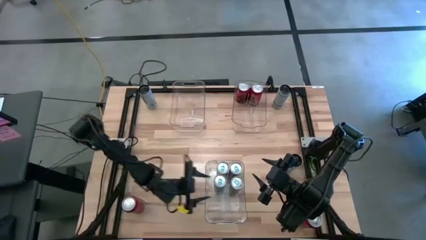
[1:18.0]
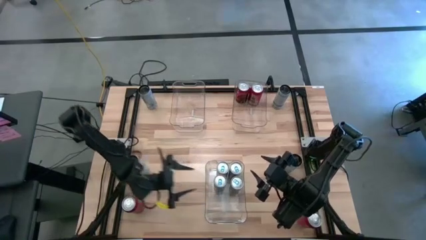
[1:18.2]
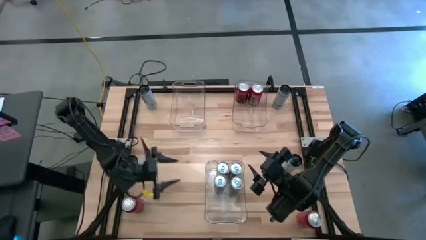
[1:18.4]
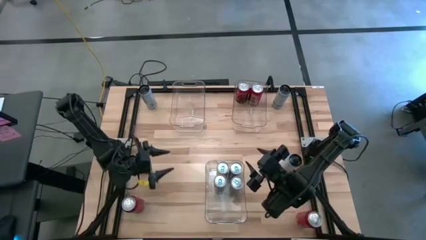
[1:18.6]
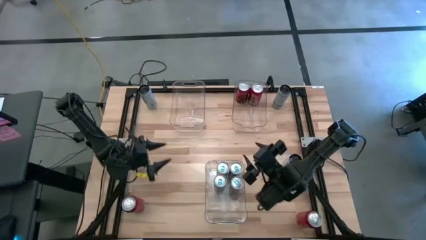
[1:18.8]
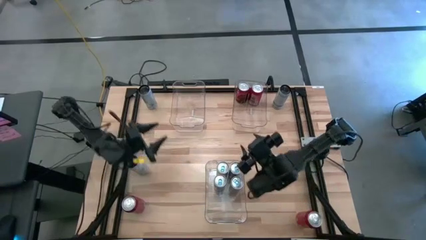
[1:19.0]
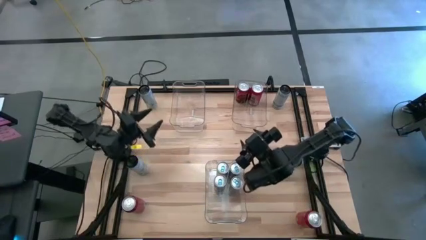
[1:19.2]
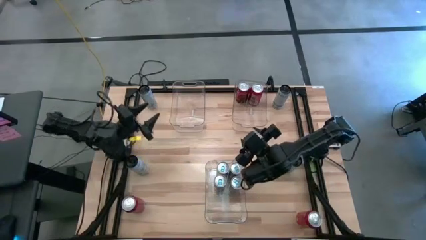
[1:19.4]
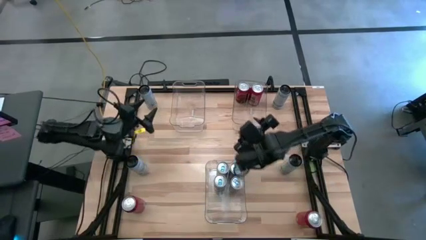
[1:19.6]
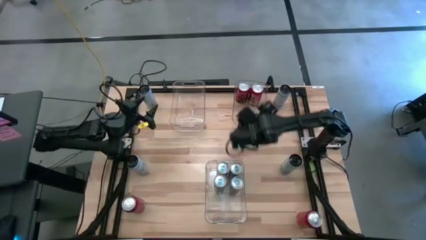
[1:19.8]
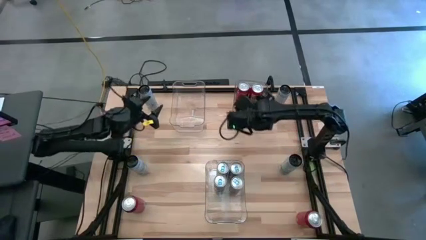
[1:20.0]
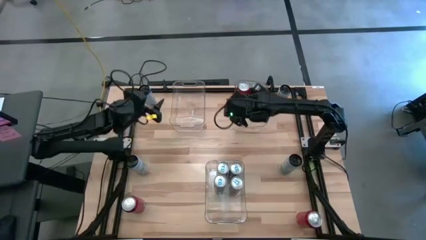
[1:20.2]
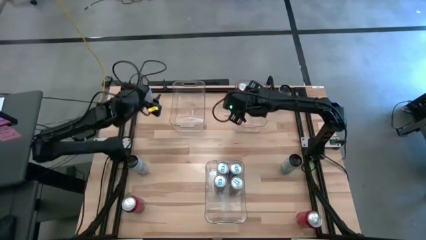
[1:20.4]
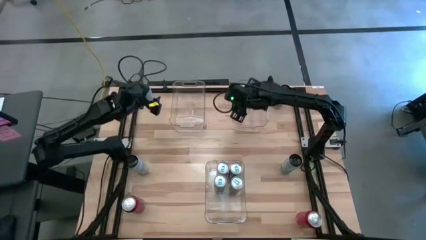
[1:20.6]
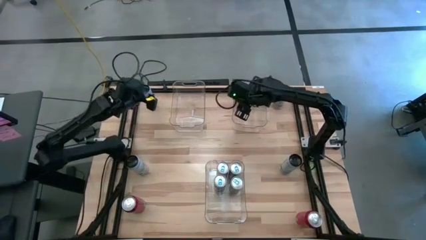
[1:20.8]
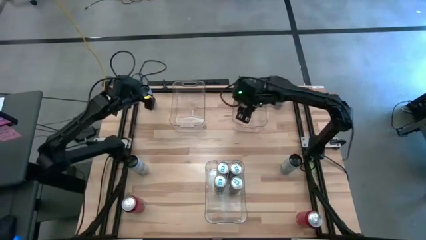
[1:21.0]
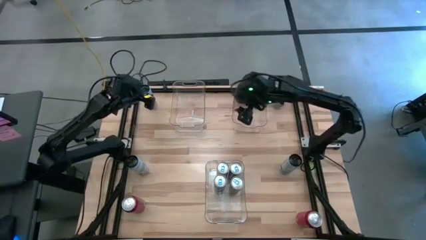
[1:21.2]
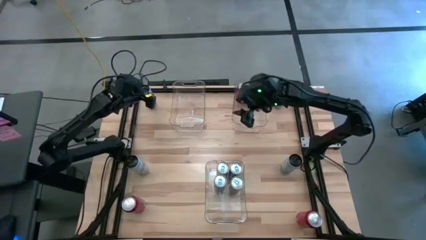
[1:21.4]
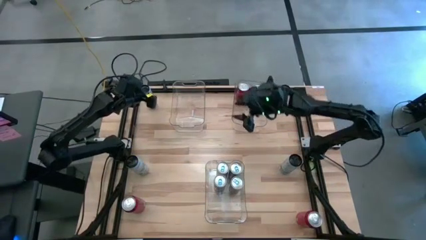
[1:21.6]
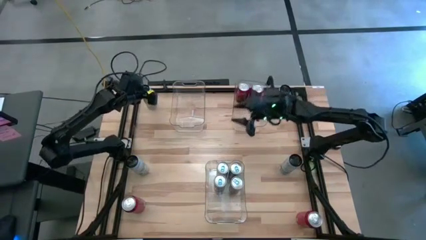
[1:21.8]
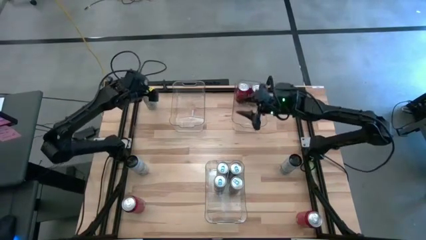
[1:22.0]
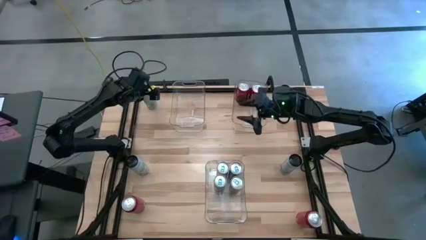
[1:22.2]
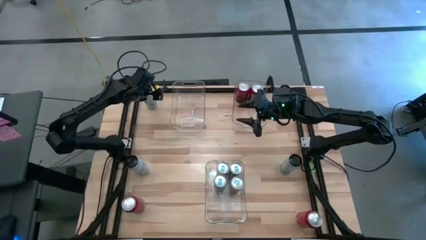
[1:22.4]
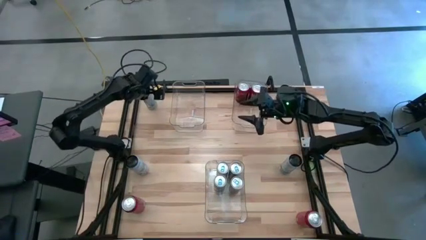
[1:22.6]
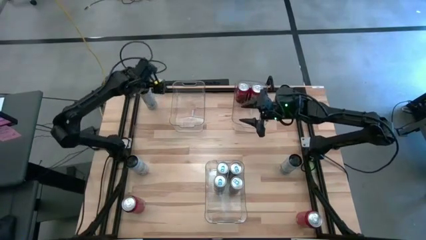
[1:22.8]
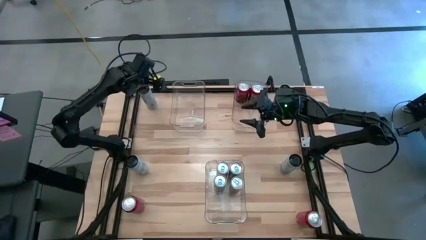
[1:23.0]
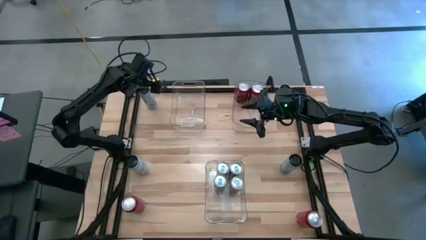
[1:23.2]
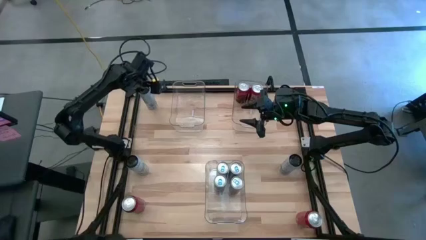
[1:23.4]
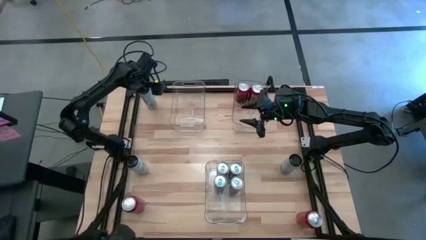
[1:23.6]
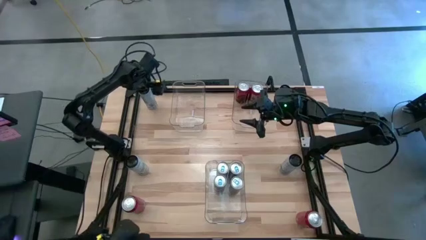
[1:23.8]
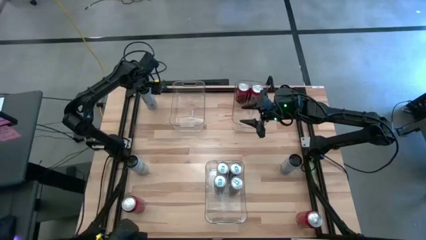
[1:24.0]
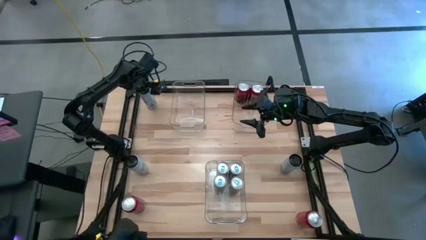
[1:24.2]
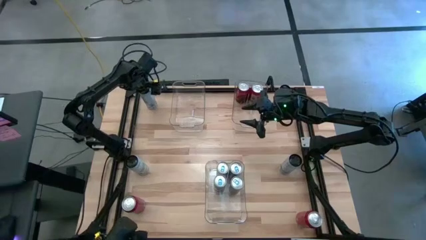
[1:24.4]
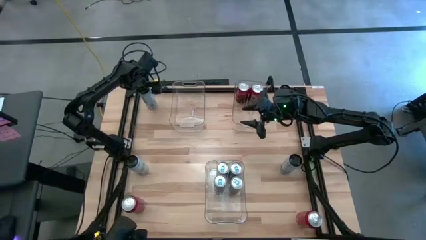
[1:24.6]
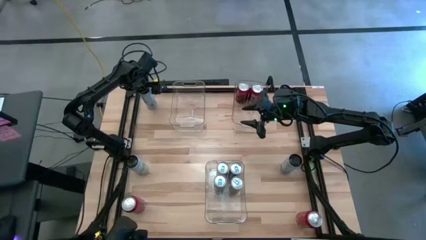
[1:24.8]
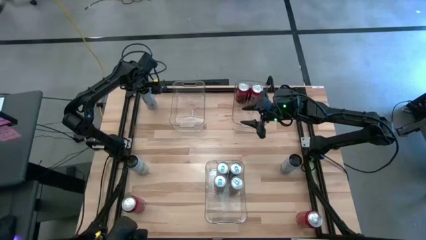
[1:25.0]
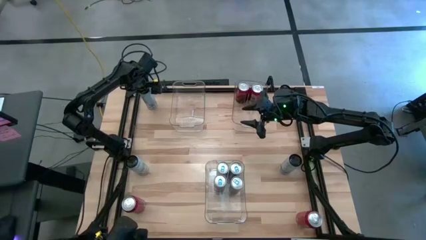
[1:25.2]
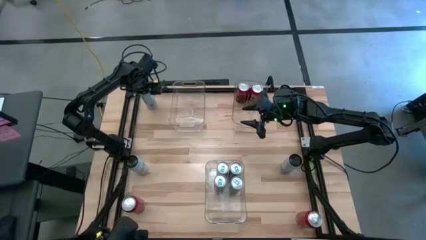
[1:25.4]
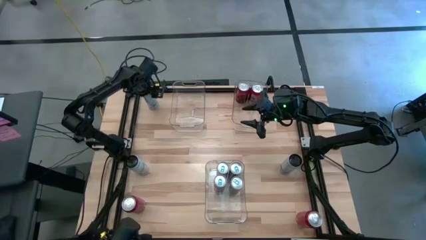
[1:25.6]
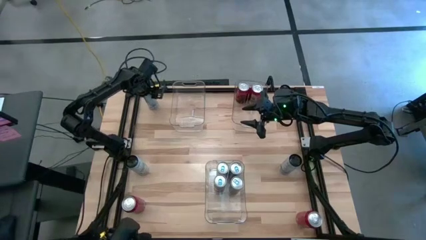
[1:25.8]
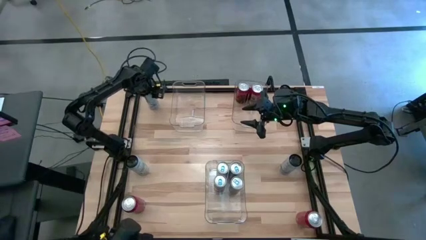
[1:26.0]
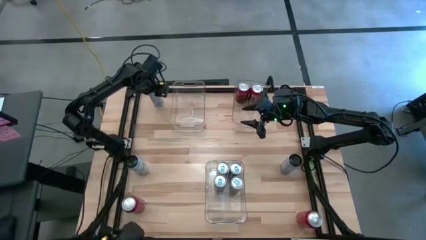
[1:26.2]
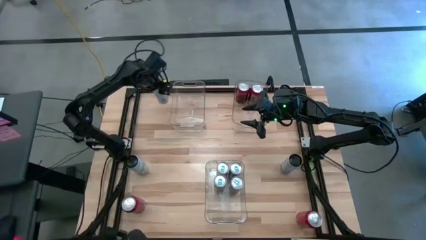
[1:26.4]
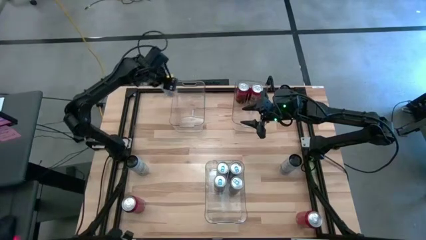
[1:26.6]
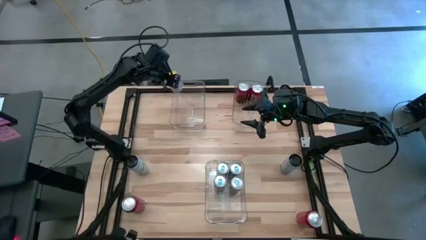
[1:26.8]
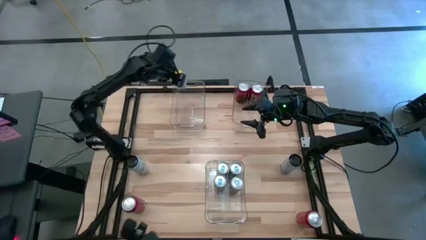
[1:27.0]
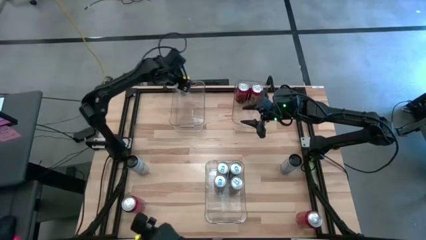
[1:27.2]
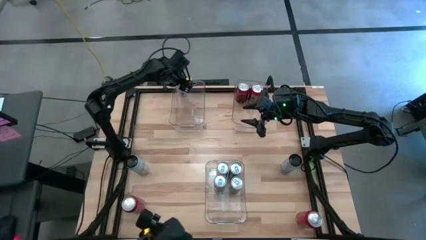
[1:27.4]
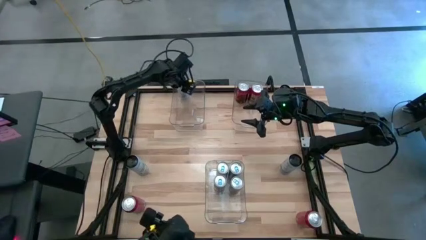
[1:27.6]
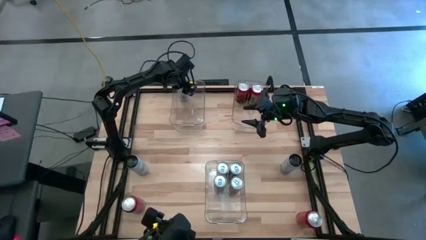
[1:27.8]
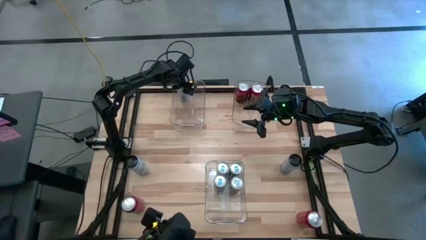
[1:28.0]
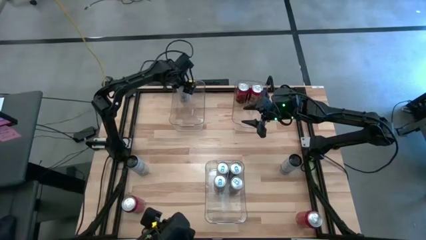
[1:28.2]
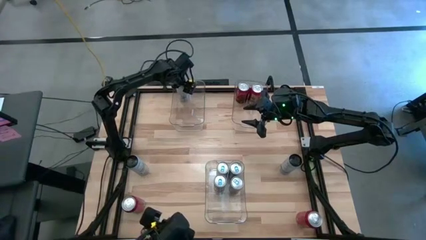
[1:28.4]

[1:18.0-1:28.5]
Task: Sort soda cans
Put the top left white soda can into the top left transparent bin

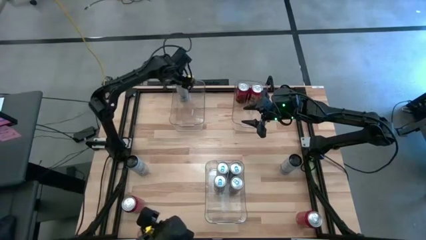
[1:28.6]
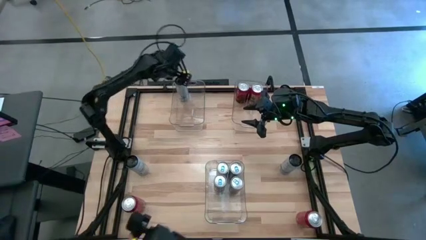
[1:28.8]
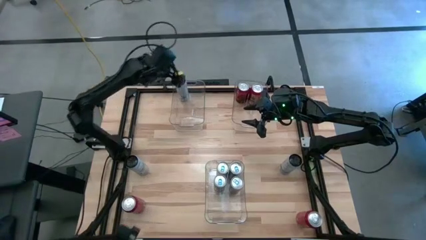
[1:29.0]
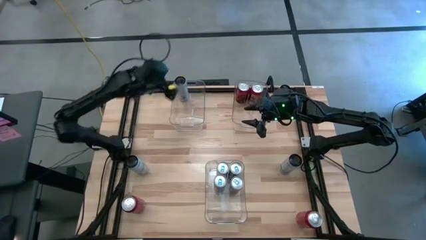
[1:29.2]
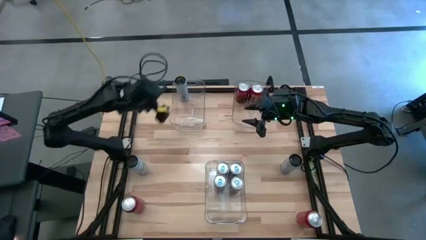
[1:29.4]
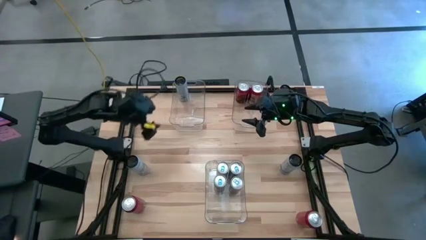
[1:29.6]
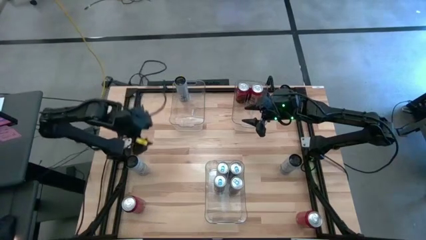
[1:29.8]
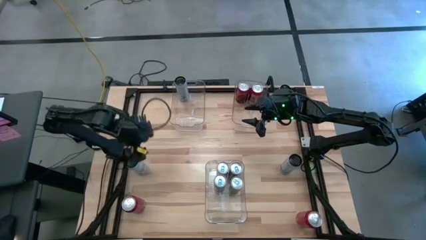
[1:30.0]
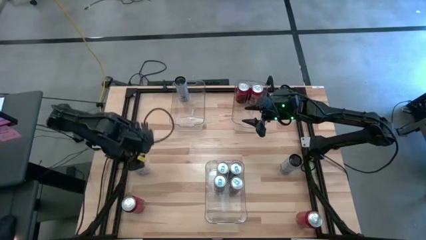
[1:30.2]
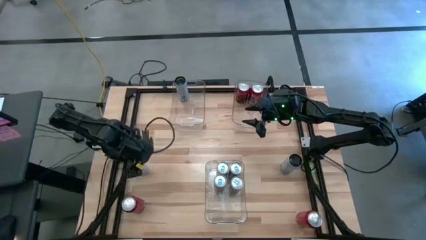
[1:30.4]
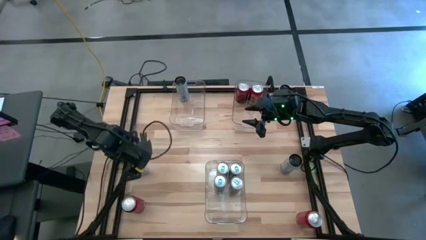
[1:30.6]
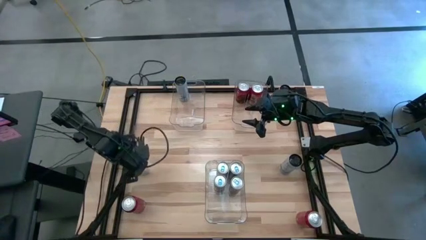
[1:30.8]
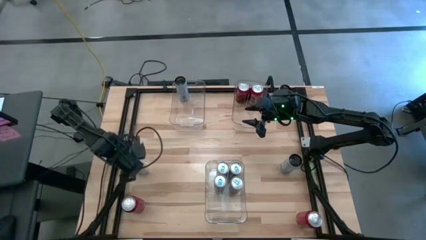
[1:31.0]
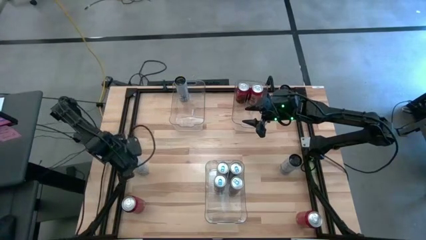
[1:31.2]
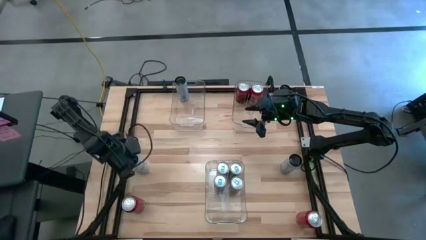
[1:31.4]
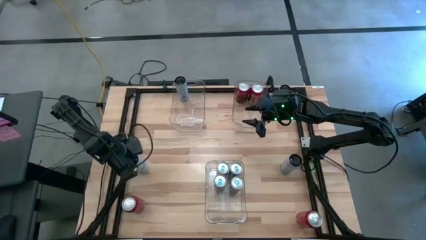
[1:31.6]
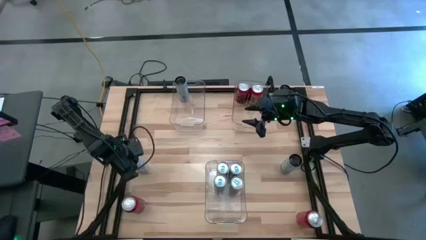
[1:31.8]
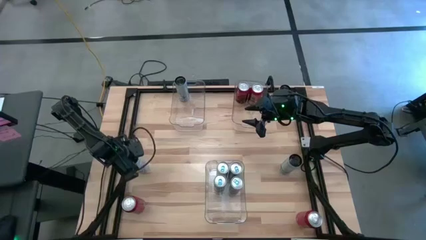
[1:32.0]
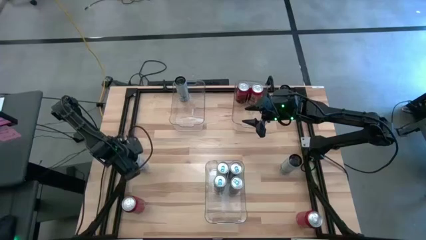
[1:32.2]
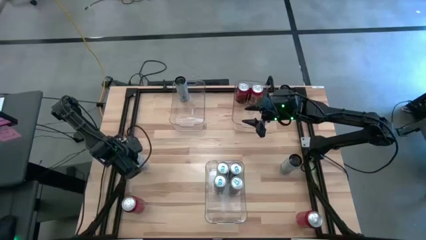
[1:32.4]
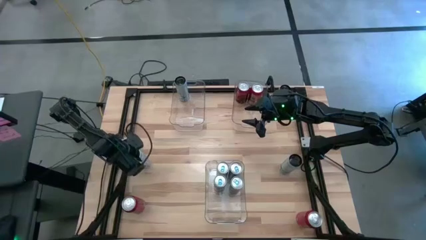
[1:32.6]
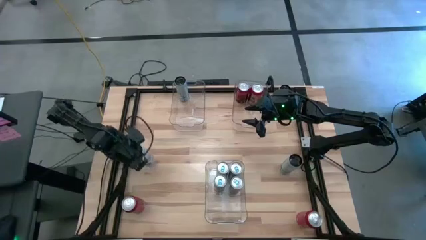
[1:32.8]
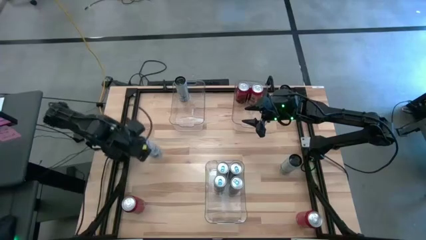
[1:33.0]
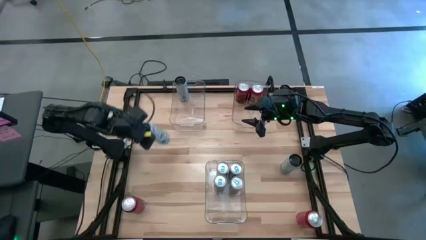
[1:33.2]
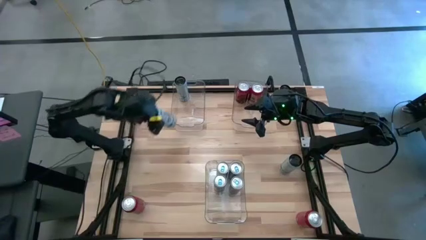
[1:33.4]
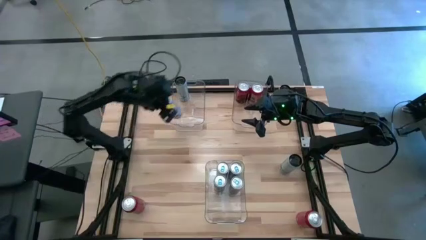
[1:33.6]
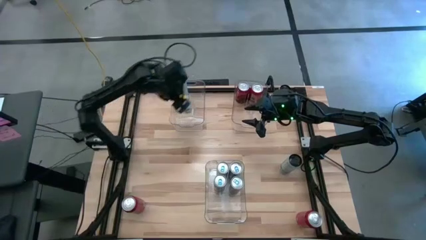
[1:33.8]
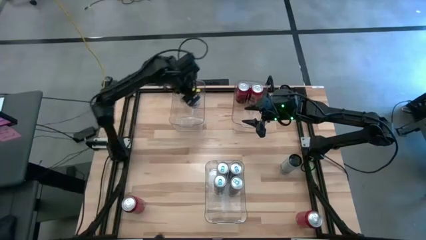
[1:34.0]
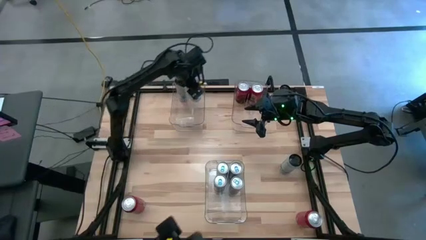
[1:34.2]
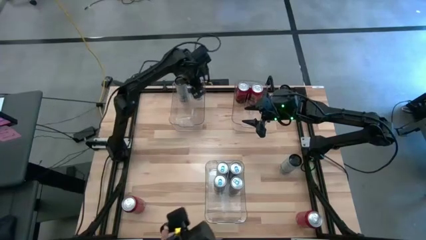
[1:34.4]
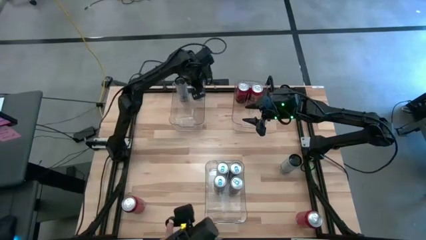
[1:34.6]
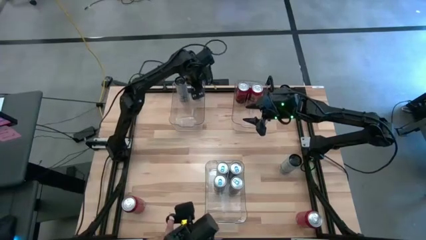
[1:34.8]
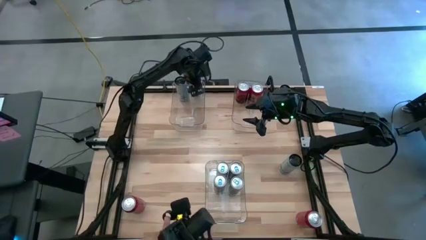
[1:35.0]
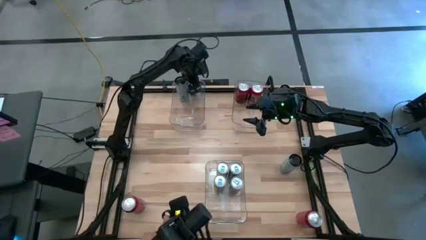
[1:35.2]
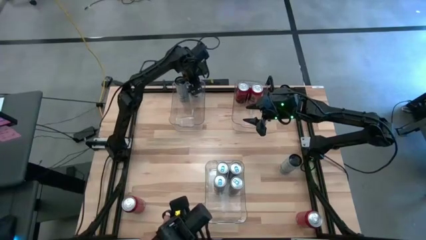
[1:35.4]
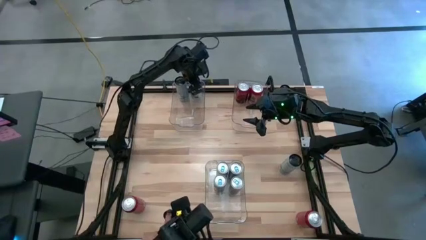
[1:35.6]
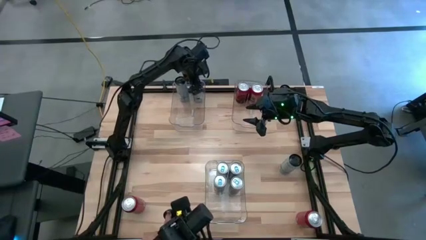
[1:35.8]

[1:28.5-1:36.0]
Put the bottom left white soda can into the top left transparent bin
